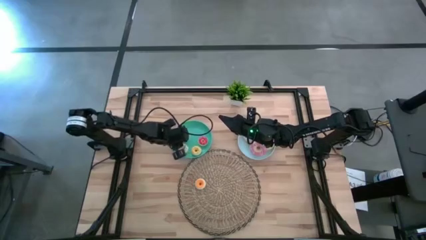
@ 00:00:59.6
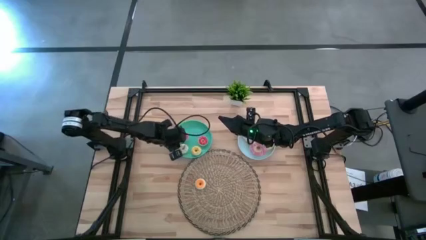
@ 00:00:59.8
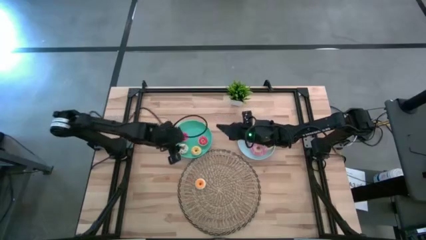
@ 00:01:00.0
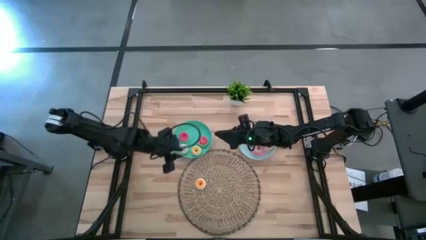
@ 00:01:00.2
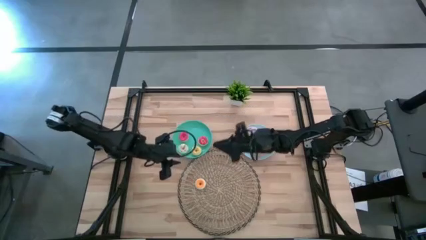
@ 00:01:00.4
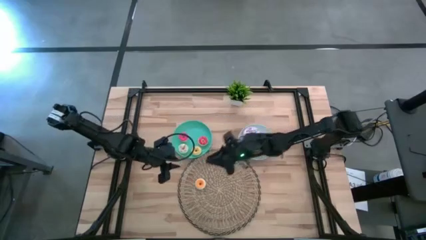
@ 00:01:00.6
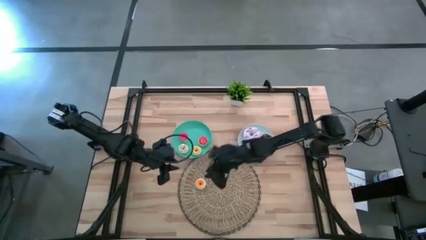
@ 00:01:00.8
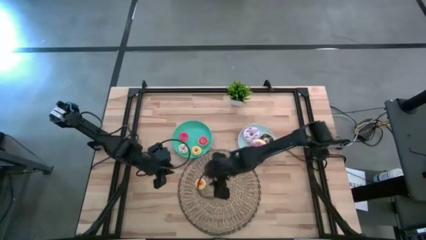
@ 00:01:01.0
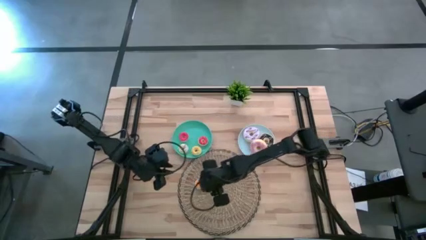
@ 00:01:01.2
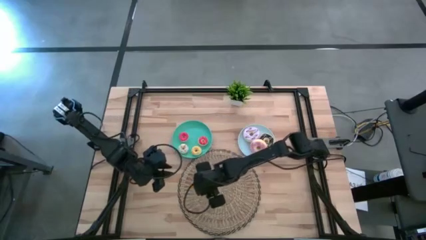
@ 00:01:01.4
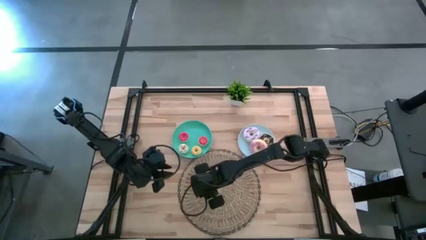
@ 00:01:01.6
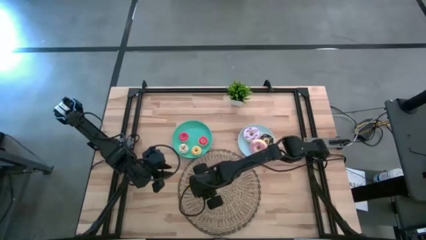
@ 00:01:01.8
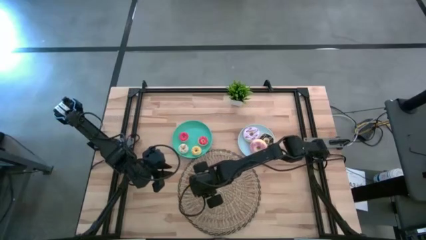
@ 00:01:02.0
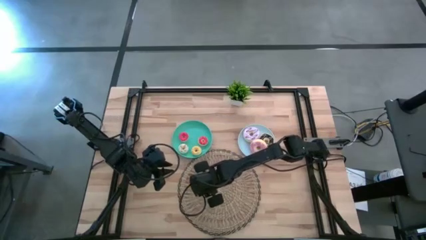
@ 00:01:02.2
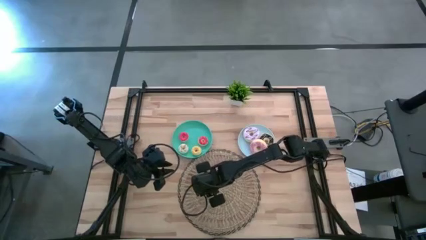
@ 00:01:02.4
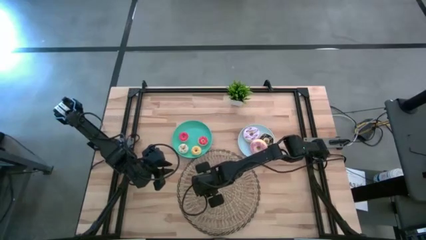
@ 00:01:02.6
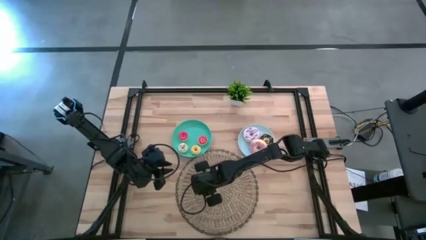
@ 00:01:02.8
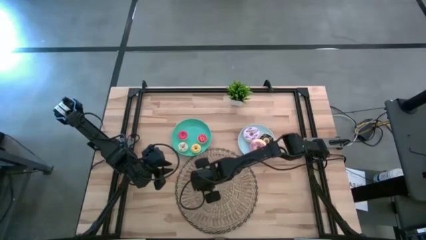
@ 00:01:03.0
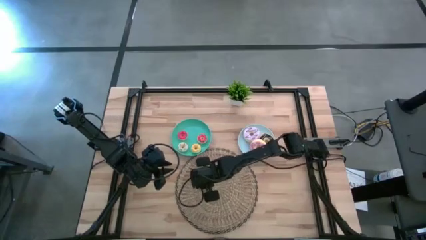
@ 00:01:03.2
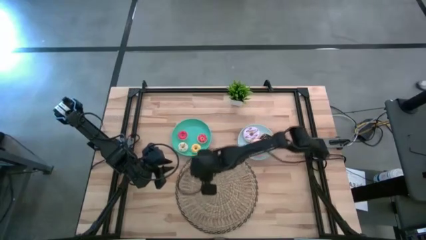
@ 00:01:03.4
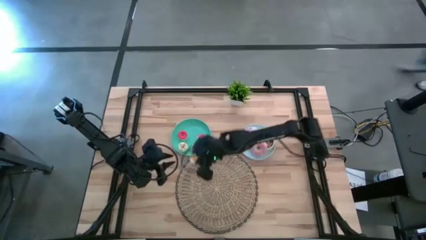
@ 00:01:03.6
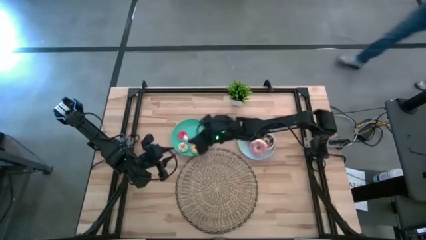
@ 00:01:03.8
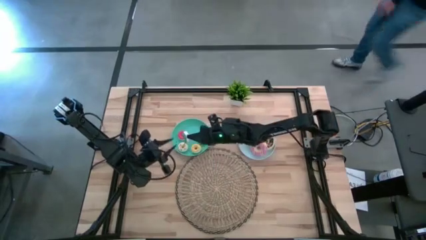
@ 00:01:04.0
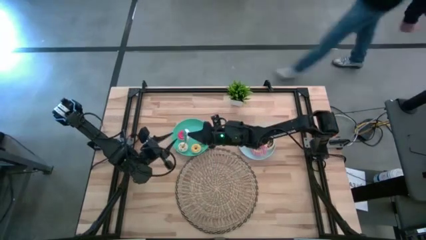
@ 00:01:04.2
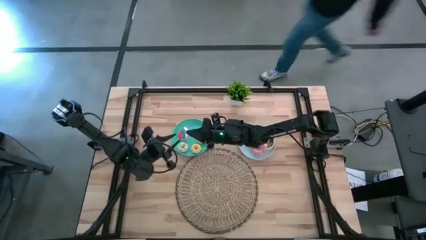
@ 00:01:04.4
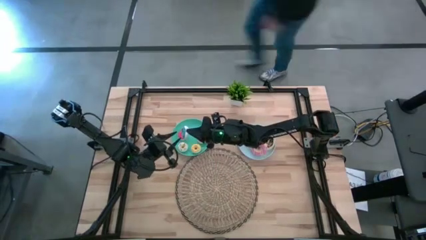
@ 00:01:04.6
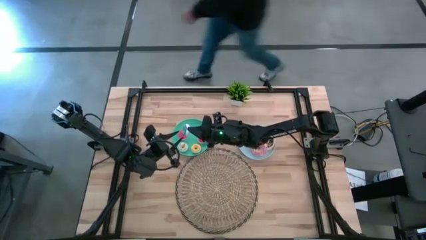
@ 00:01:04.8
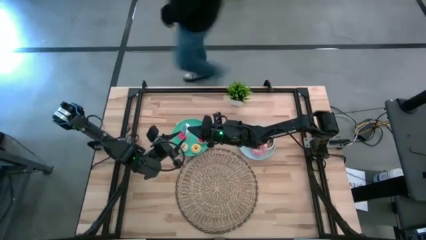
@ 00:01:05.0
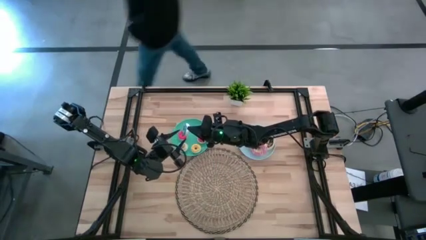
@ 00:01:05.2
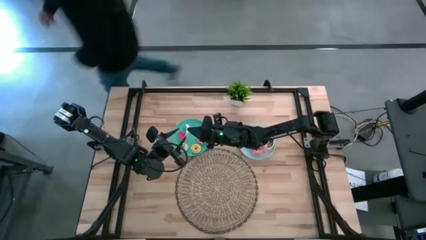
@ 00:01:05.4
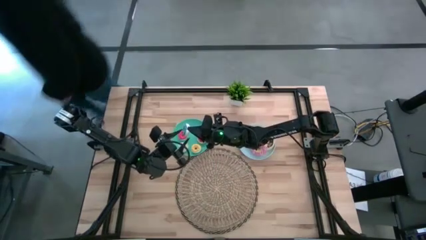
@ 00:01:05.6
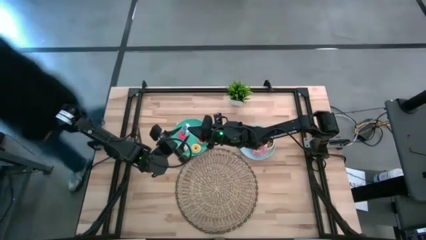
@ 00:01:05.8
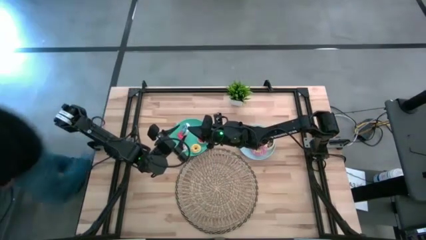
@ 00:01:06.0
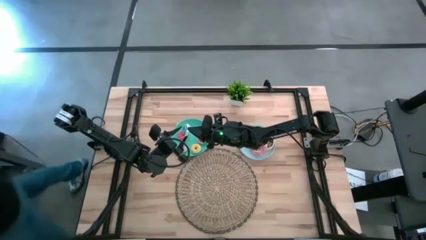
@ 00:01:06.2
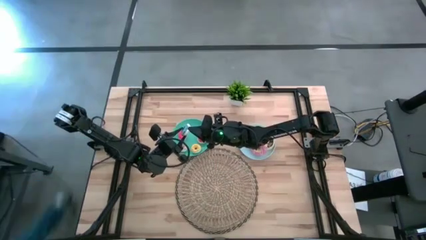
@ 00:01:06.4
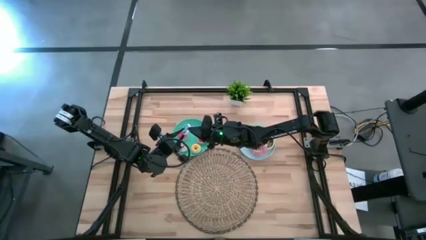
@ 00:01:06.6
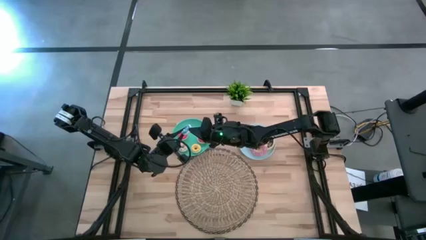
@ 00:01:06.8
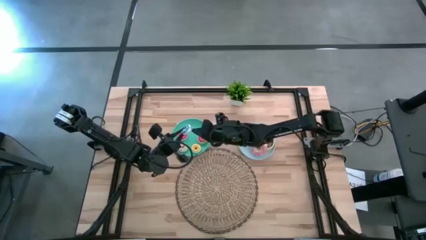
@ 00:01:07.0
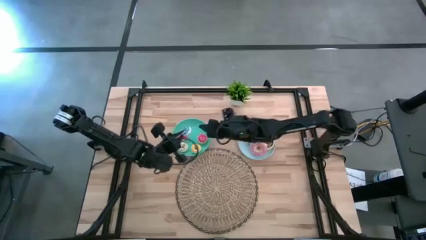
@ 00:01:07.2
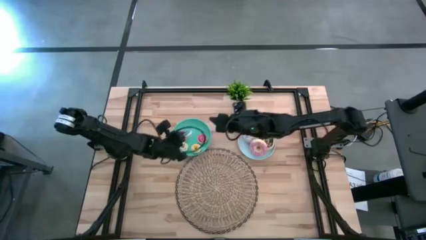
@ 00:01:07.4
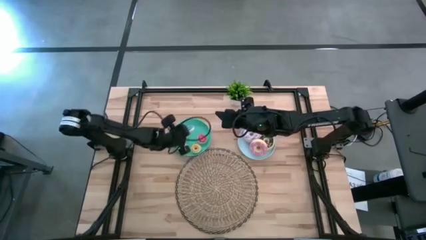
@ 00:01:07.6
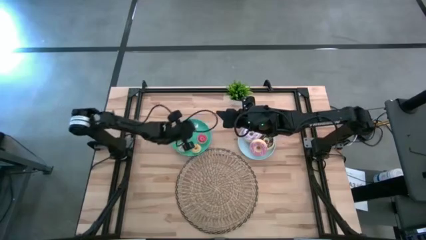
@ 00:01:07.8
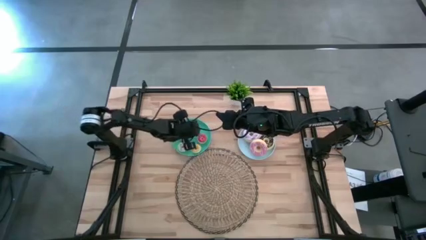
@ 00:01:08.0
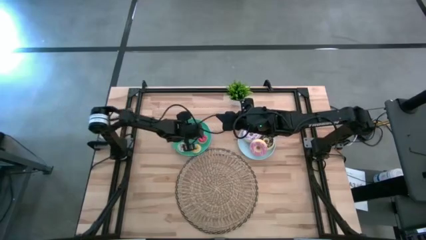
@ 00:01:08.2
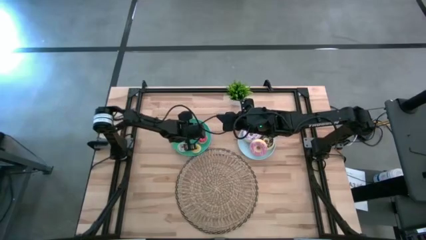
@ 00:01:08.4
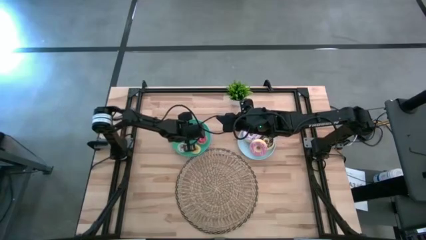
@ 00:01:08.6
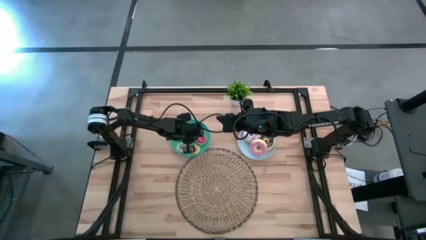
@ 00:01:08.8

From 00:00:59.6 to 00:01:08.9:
Task: Pick & Place donuts
Put the small blue doughnut on the green plate

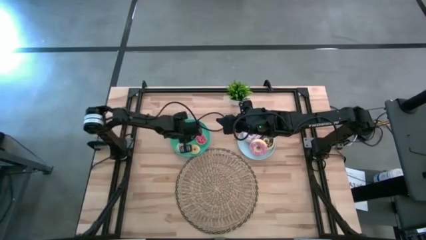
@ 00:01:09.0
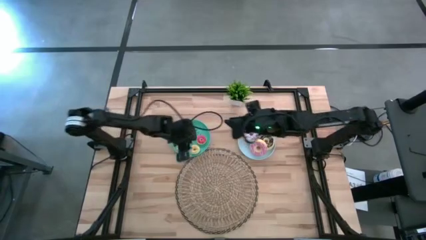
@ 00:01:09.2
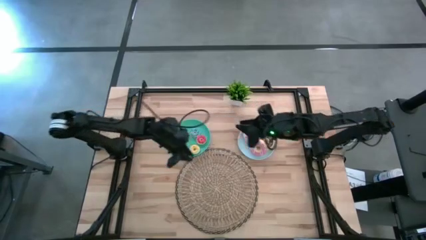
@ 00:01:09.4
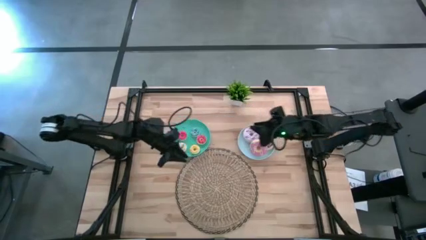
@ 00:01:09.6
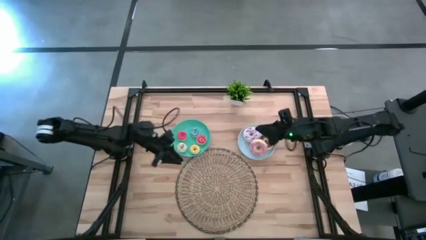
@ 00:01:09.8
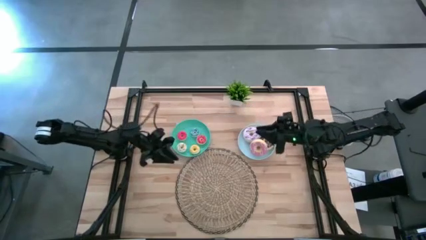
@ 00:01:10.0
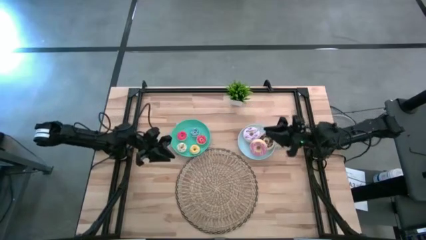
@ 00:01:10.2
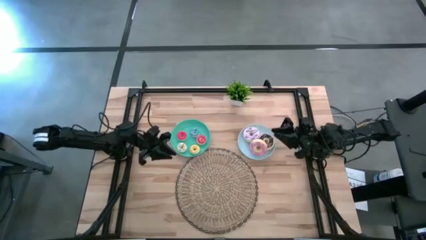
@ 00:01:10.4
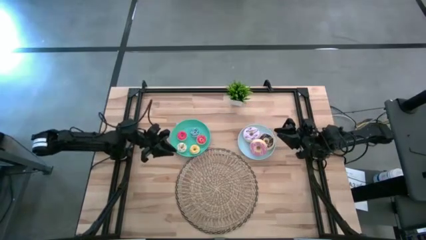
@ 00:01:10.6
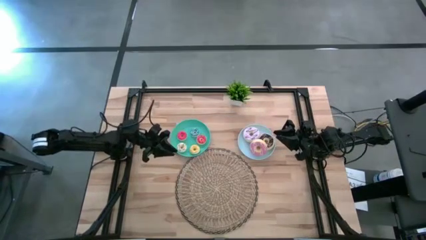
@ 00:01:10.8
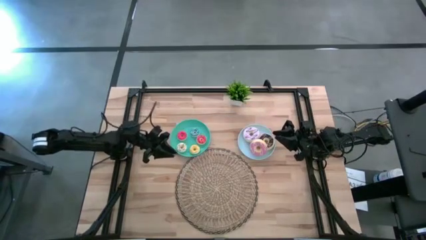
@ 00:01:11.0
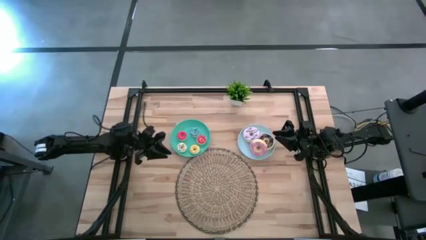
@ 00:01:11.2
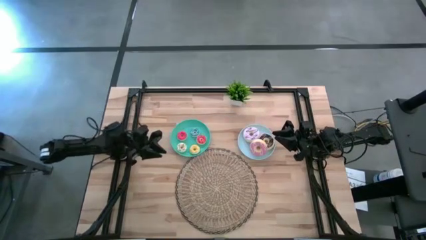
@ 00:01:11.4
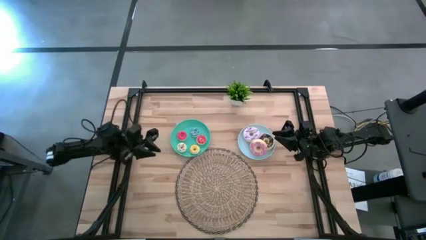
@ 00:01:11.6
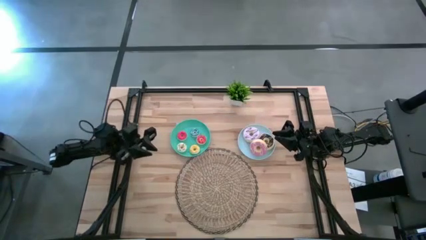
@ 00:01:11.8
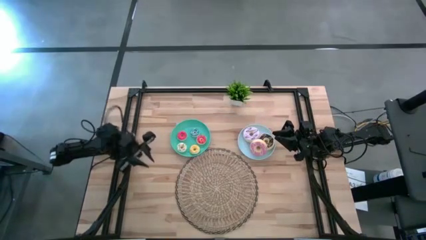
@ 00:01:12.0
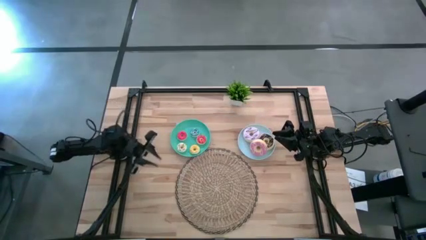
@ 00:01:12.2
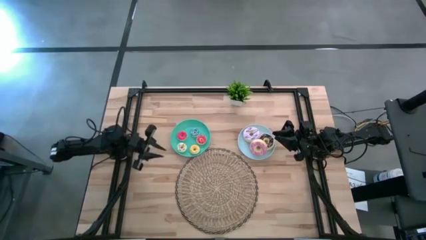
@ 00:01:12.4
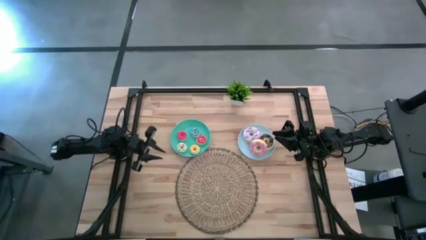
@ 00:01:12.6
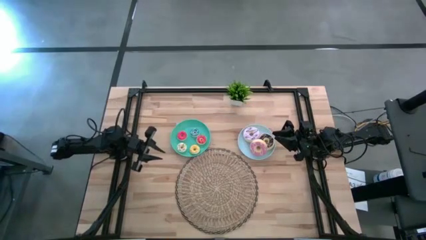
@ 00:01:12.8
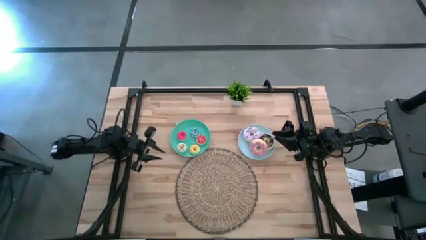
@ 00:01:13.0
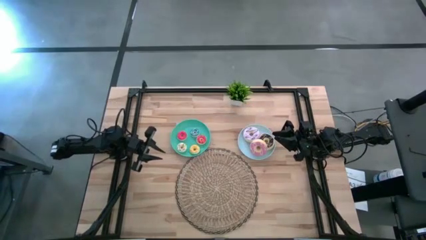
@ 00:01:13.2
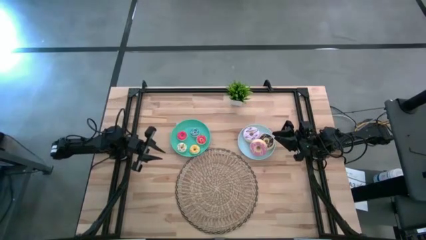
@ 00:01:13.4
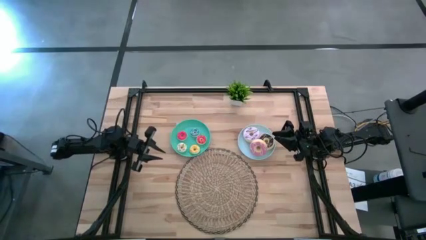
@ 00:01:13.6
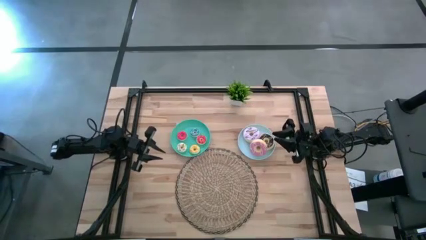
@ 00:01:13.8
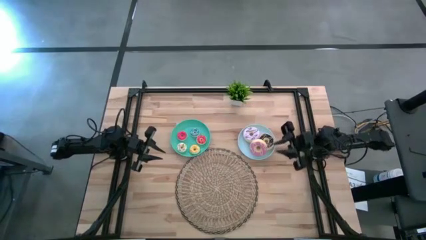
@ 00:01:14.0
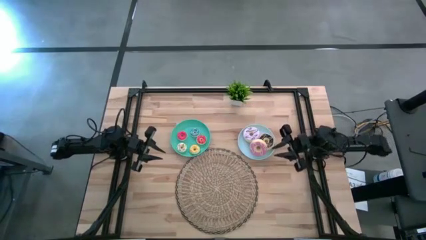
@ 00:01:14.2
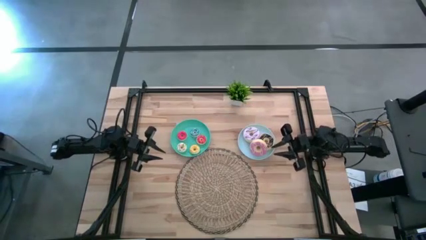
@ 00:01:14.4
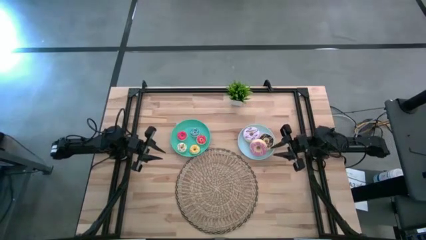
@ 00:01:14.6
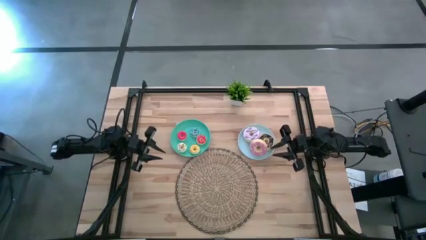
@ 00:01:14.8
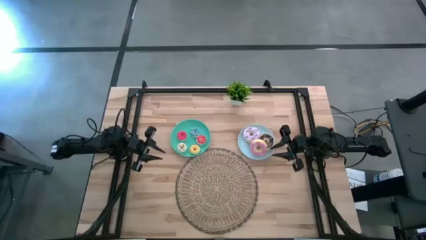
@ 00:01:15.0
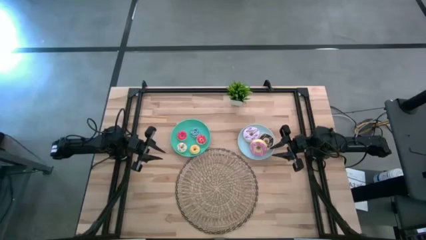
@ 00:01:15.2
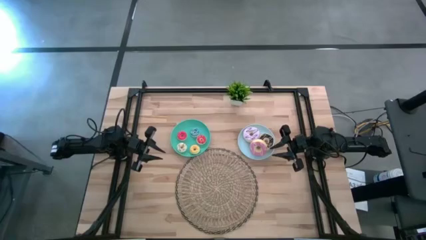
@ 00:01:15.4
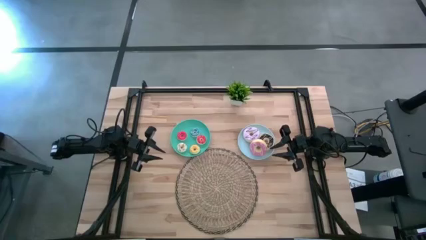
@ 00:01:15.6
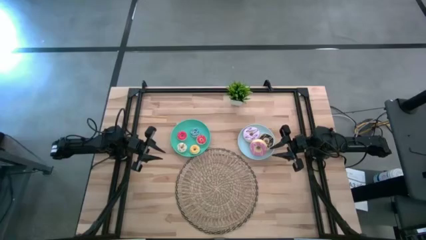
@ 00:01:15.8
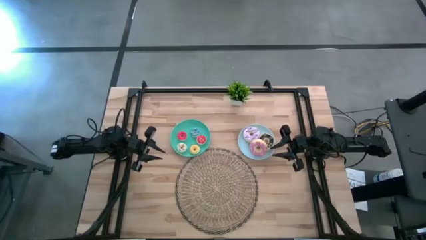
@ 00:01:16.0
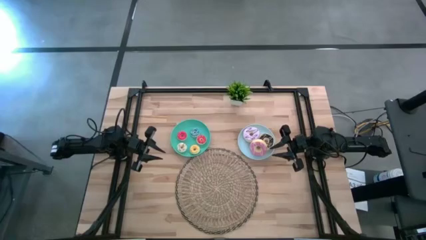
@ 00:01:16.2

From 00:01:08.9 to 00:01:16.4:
Return to Home Position
